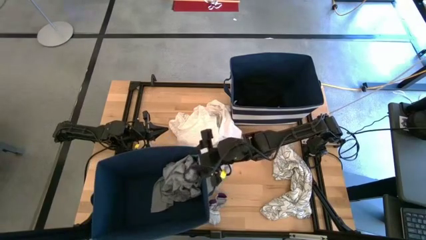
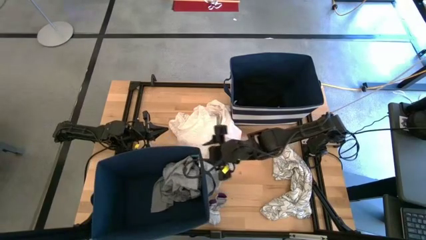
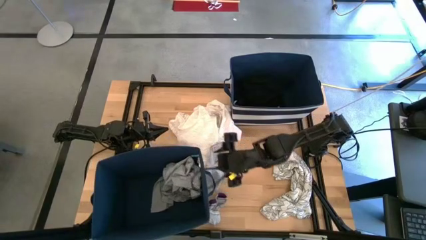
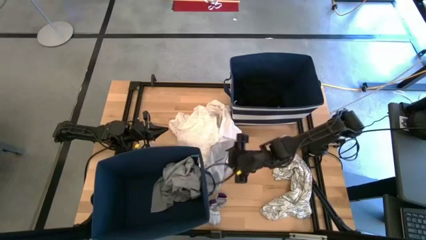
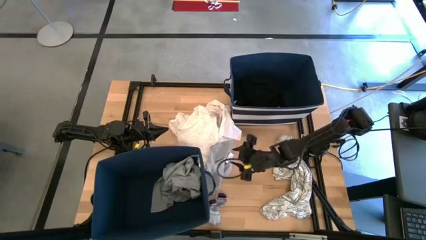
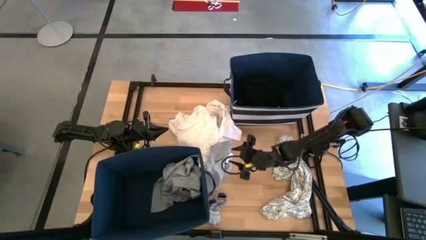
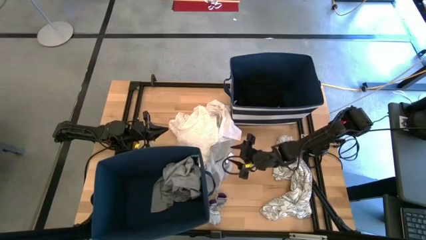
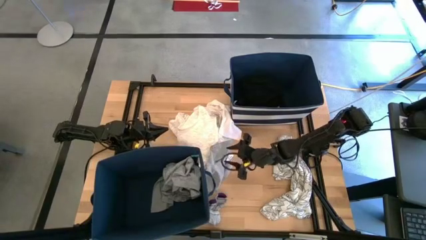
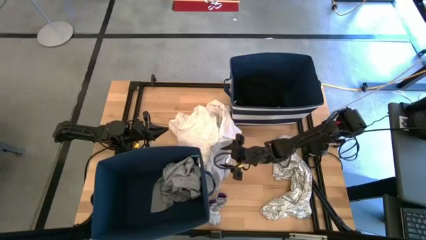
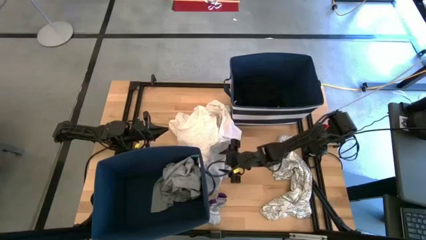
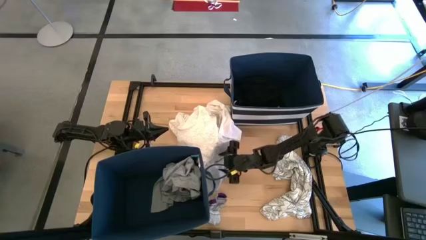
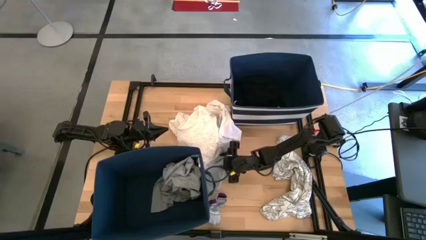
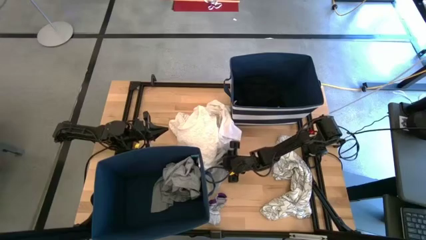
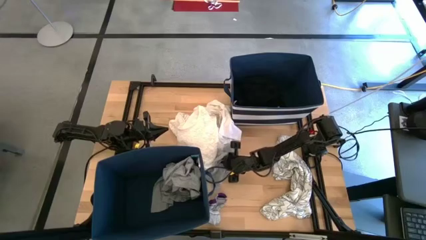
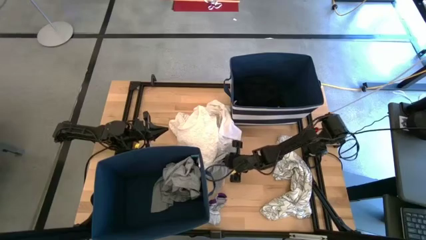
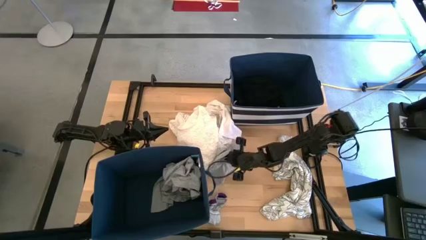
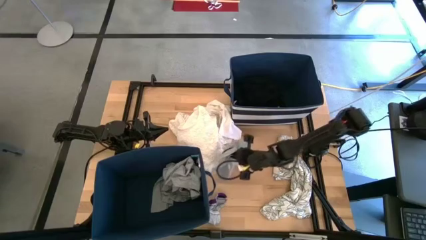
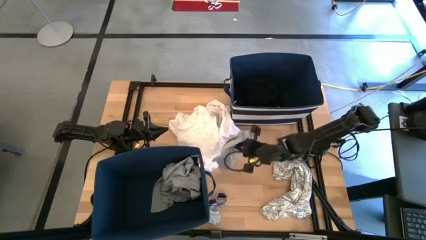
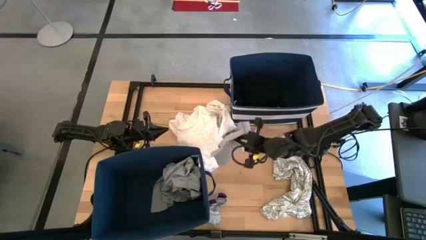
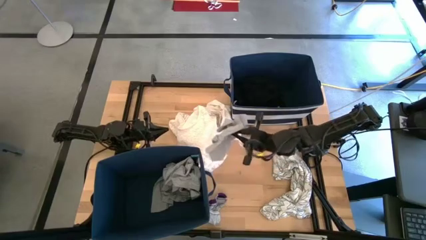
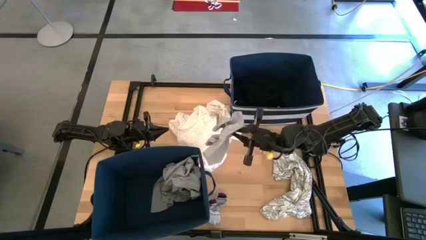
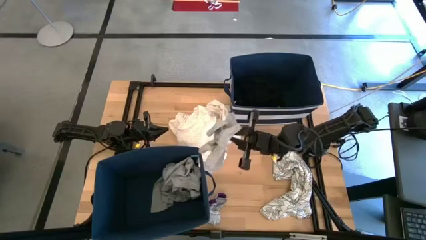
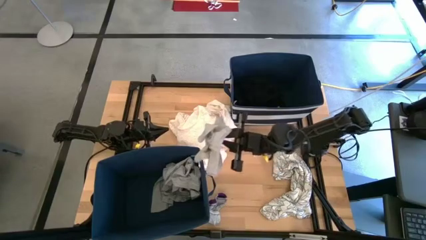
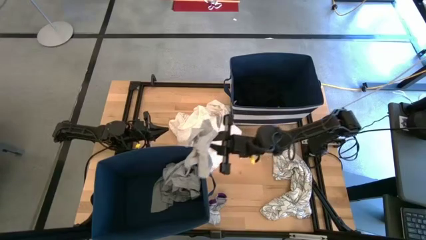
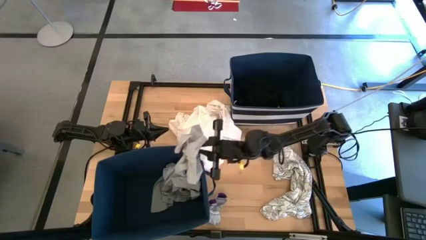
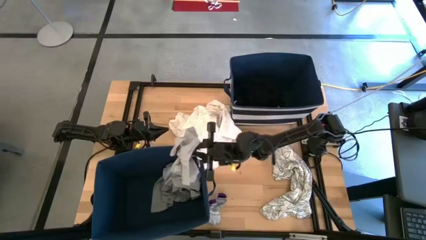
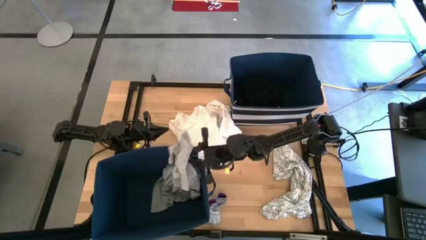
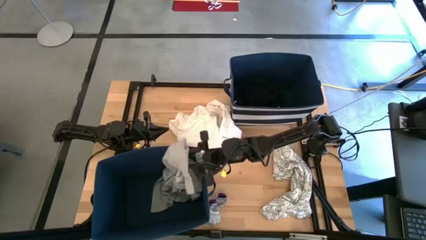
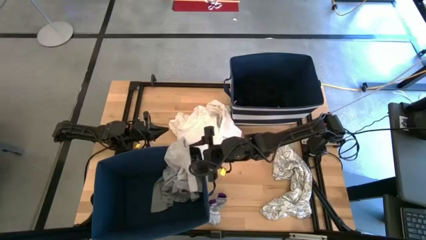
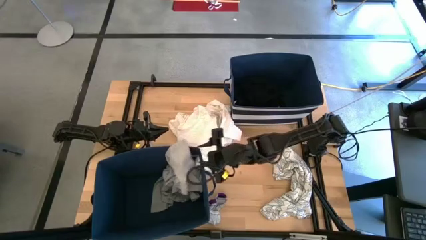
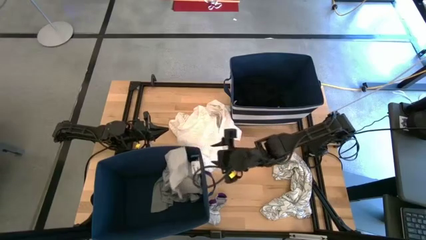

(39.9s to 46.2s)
Task: Sort clothes
Put the gray underwear into the bottom left laundry bin

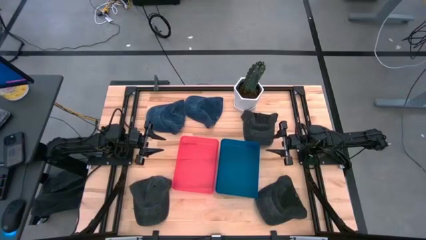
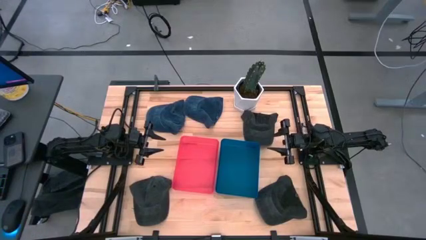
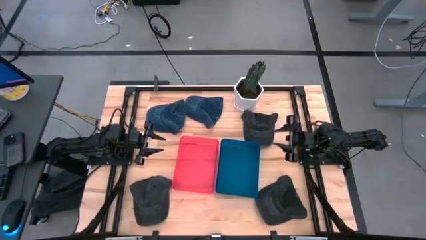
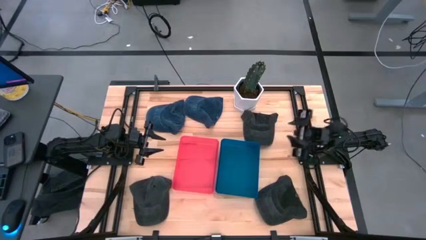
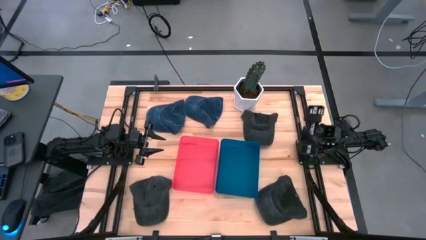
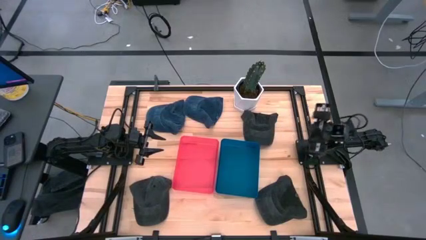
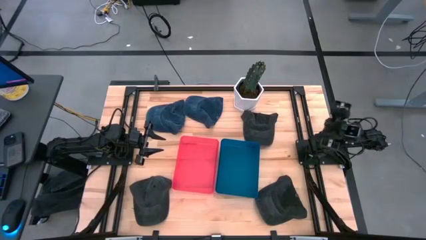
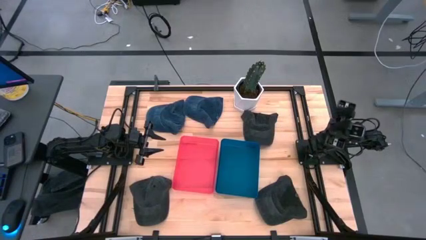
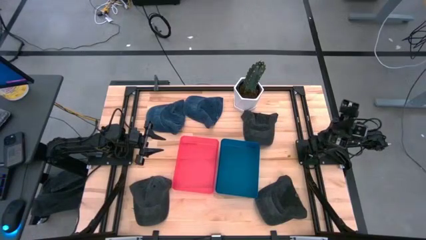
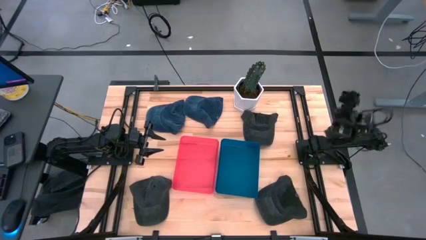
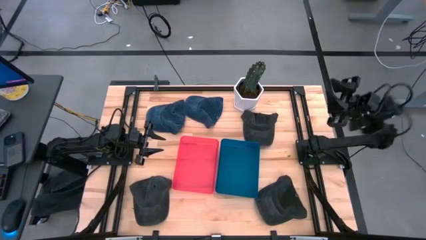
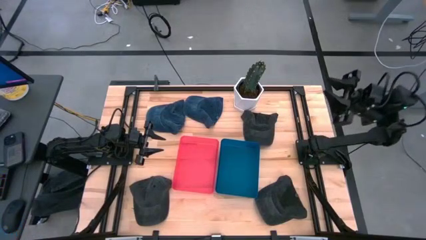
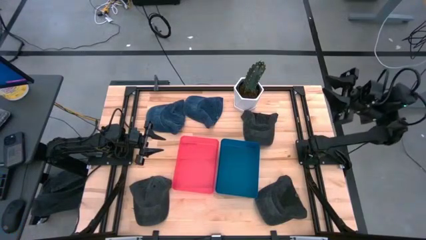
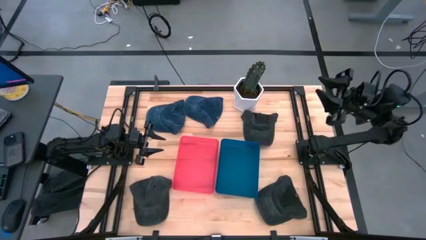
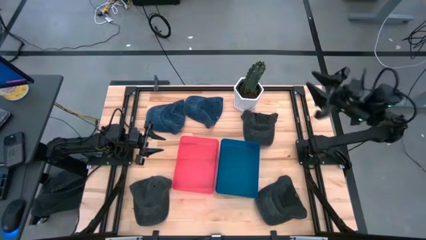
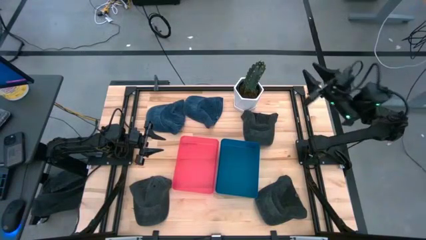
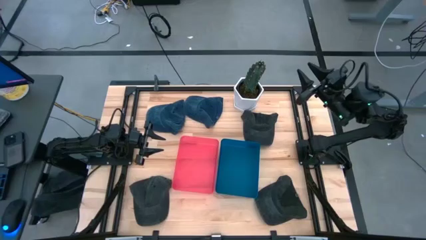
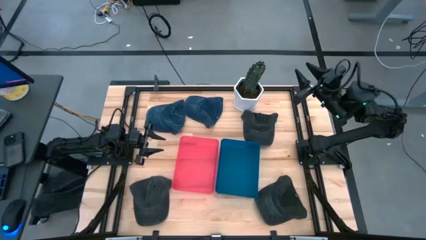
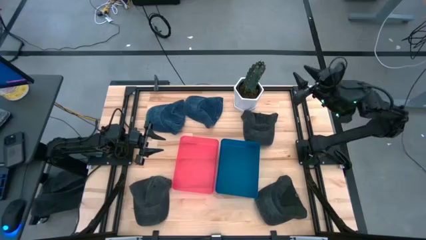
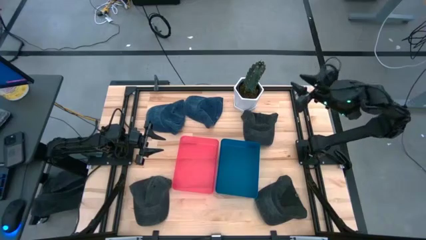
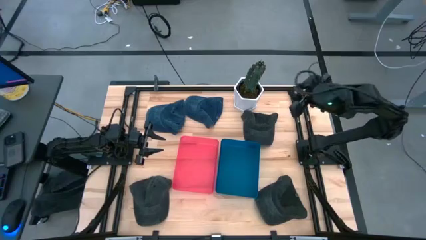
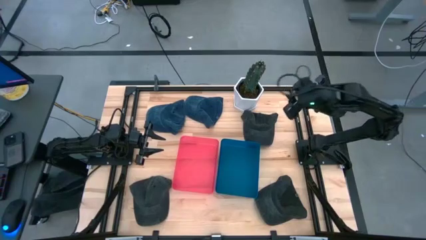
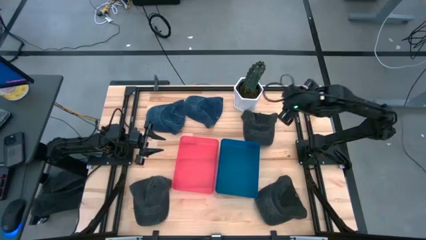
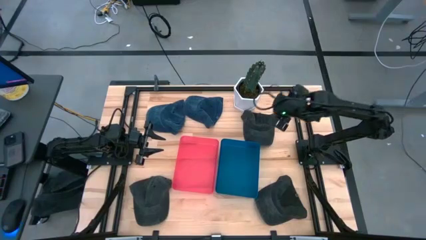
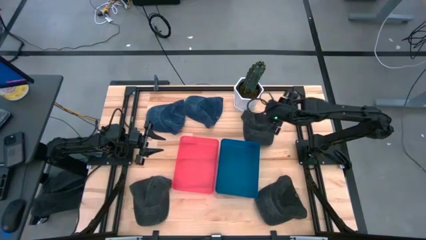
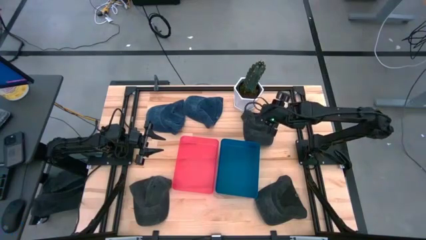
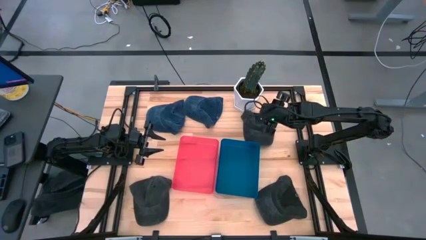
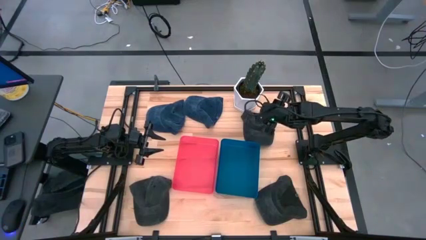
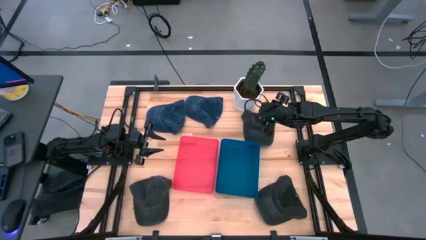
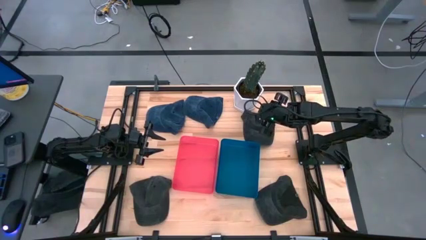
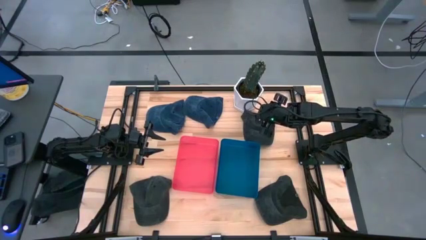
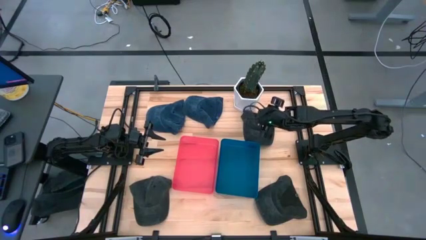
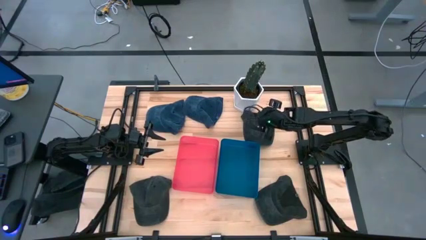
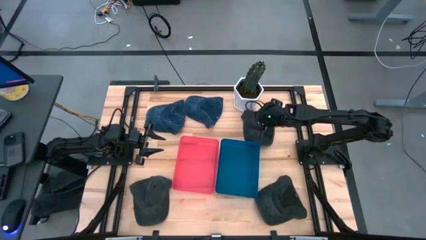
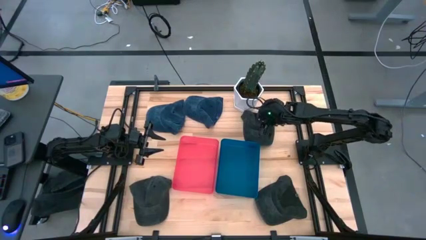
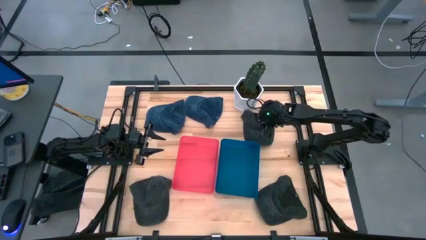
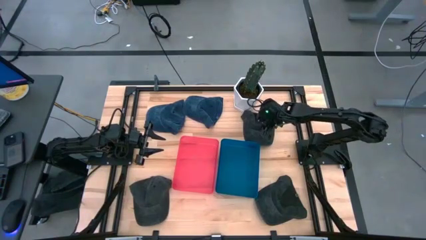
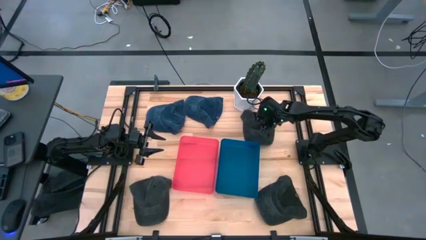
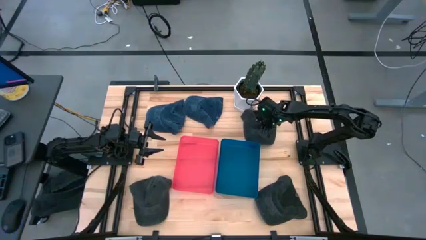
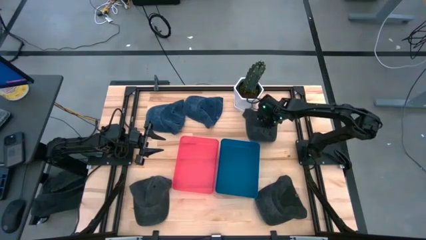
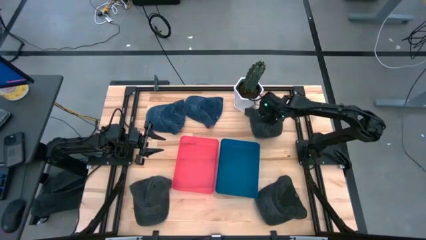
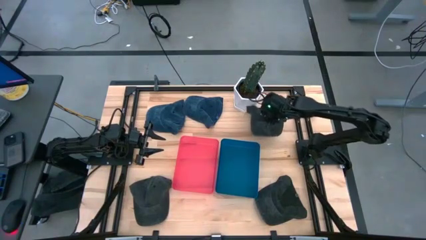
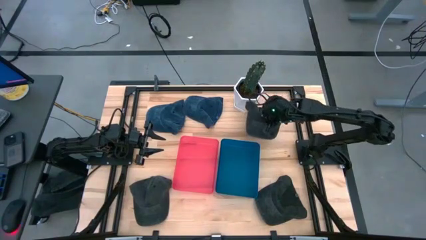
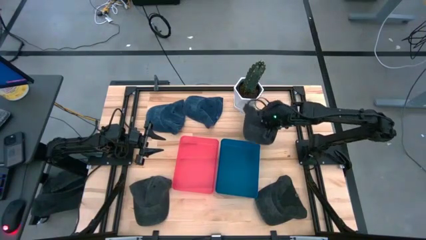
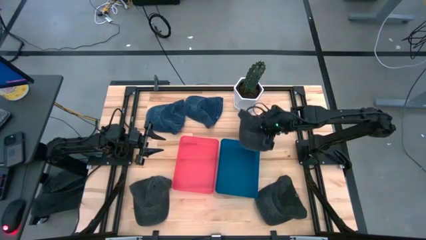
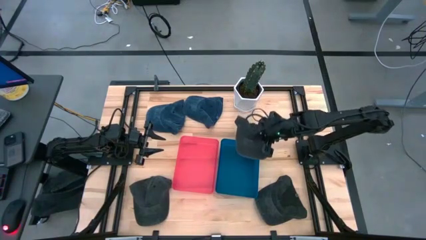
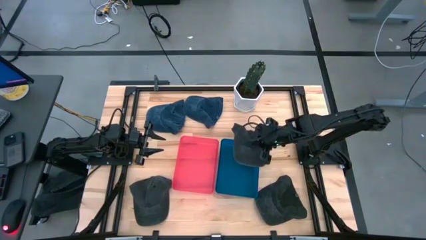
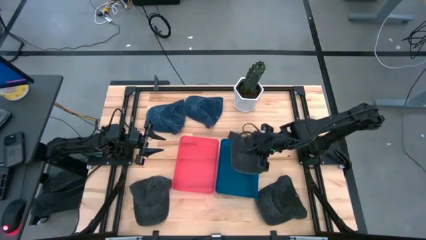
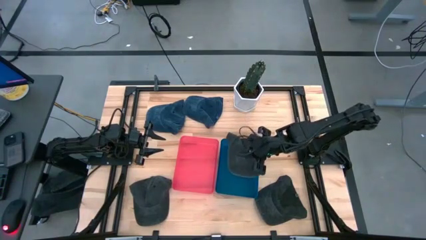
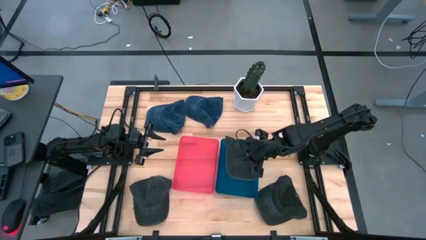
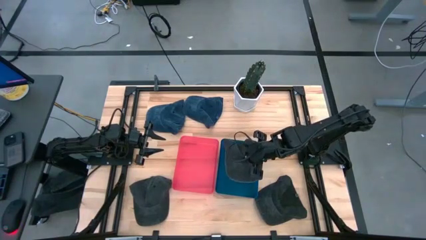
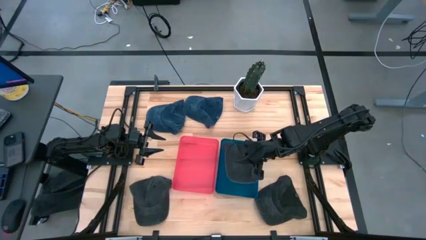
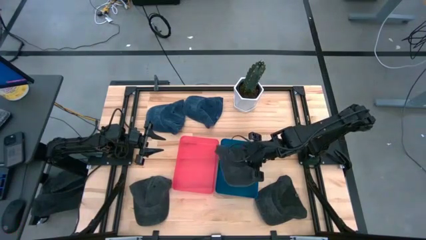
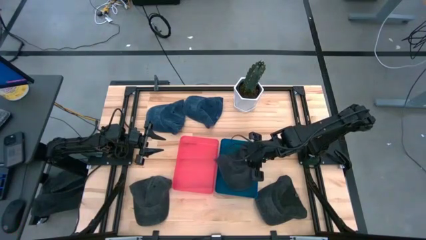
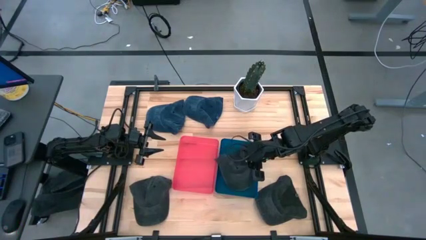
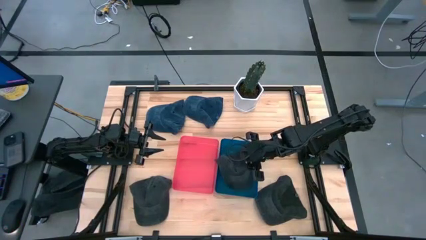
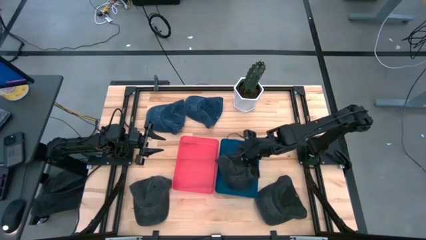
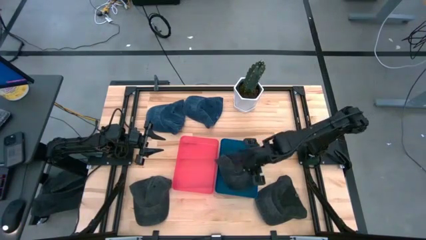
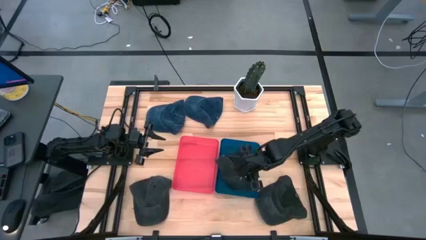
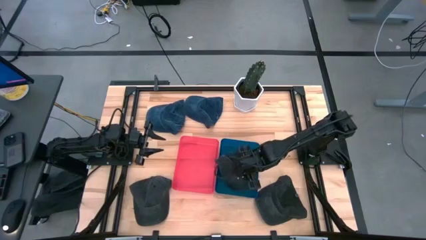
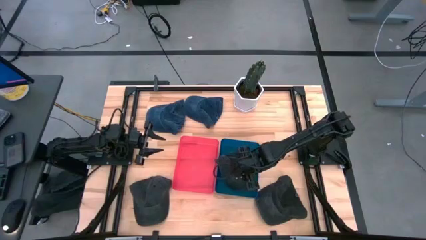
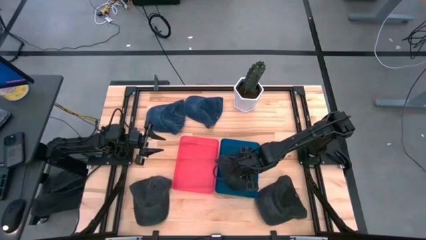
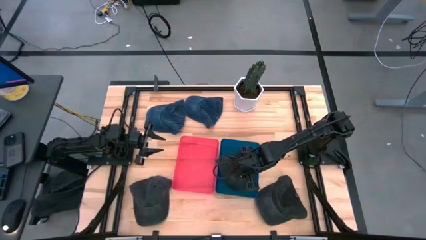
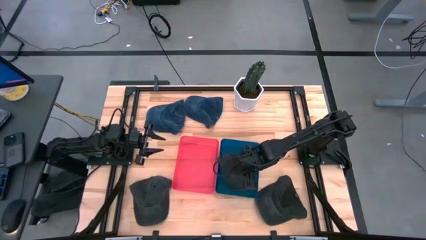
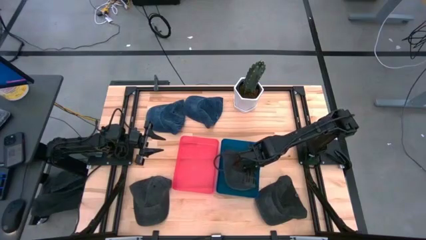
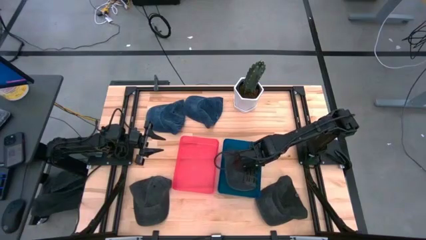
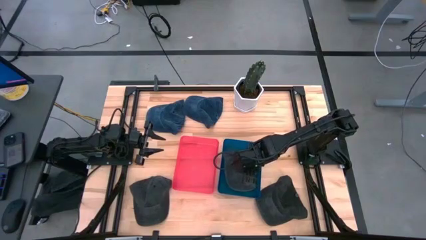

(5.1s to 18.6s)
Task: Pick & Place hat
Put the top black cap into the blue bin
